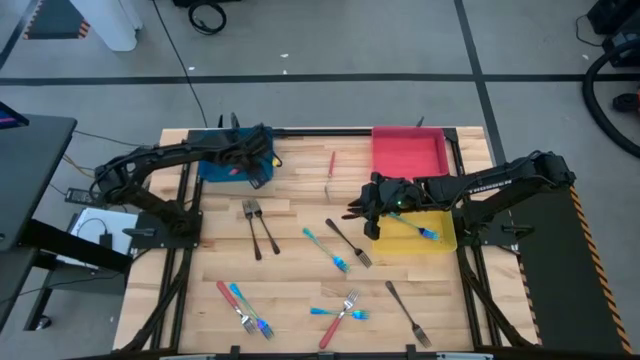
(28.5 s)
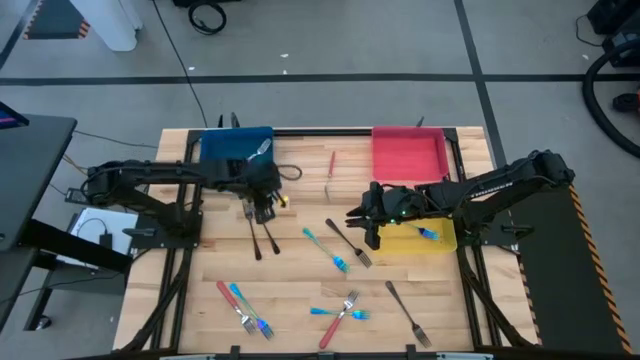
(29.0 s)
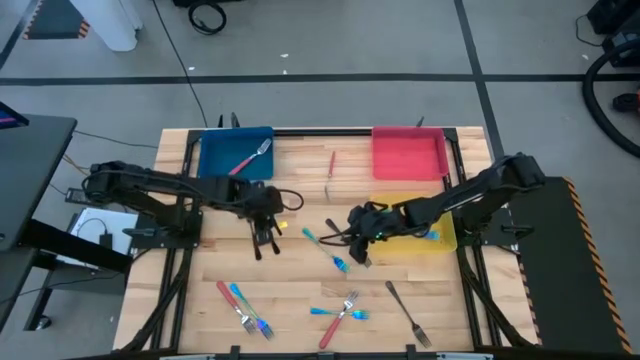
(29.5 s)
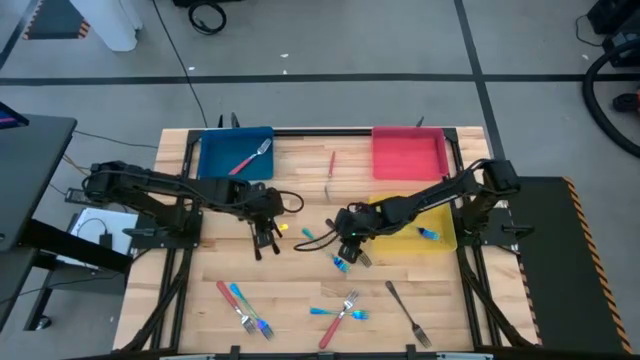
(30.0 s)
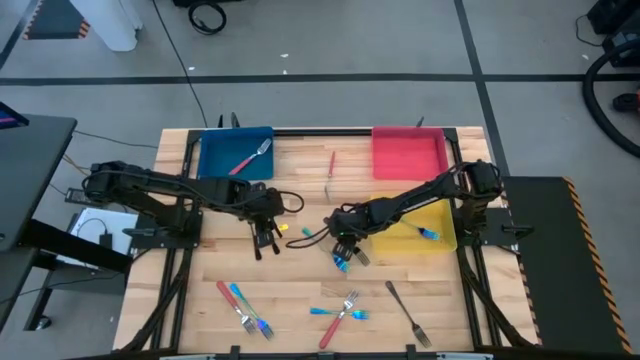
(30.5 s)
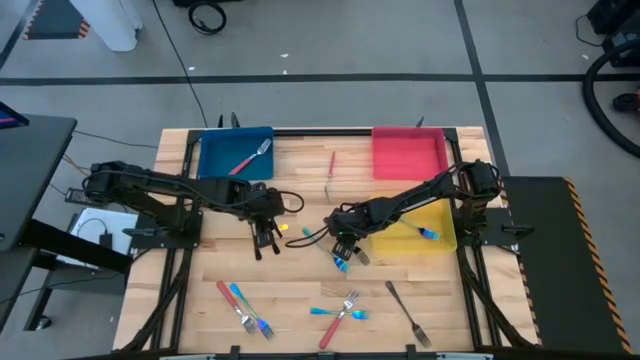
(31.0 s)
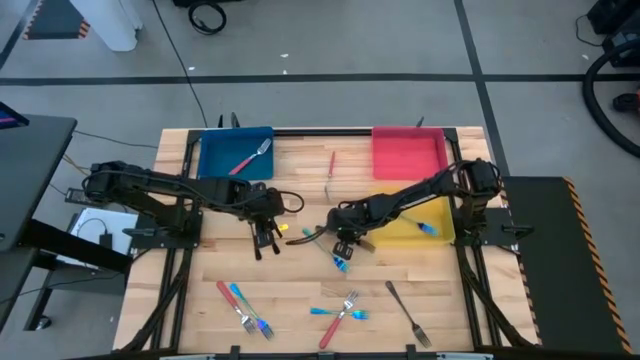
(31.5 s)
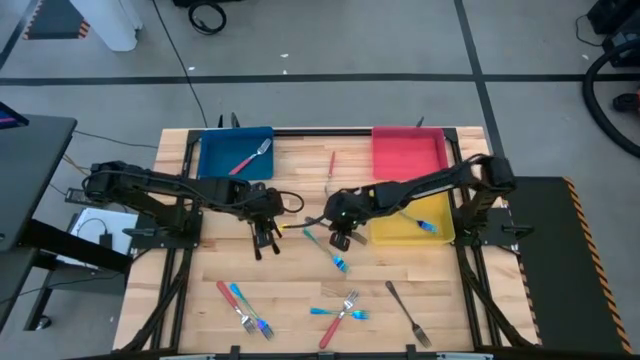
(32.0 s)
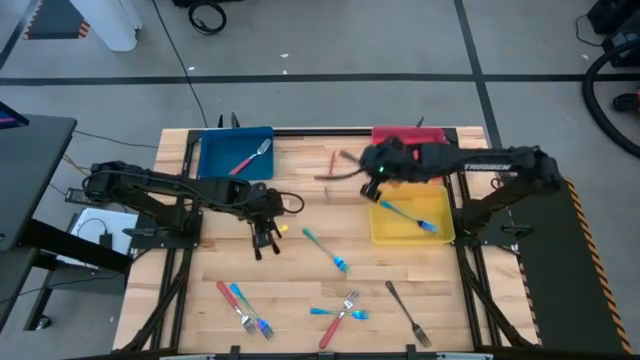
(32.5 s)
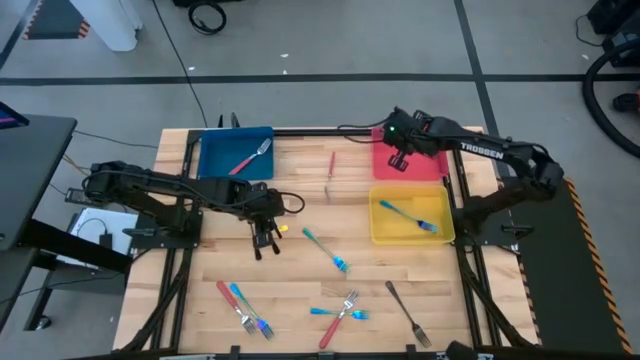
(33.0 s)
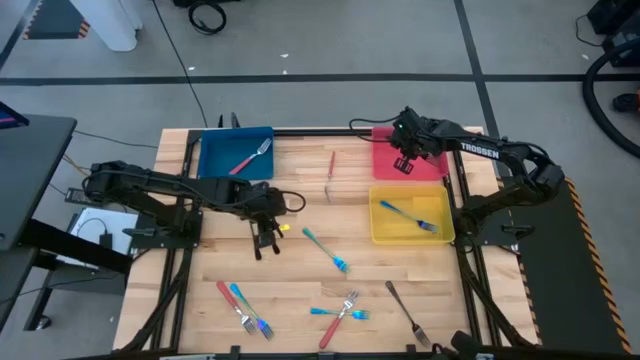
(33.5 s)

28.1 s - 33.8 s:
Task: Sort silverware by color (type)
Put the center black fork into the red bin

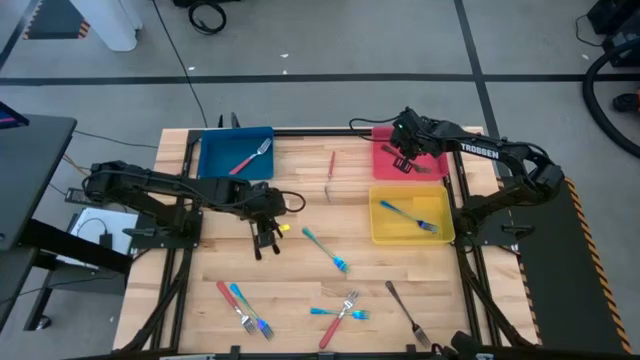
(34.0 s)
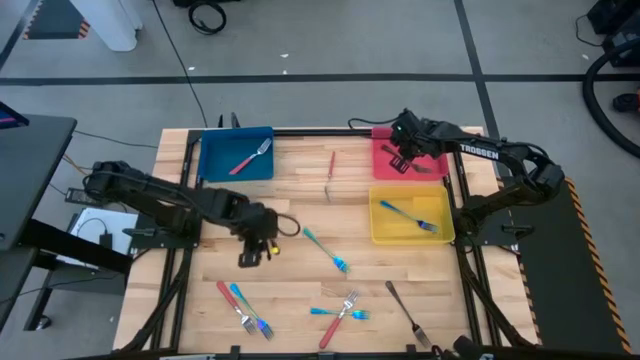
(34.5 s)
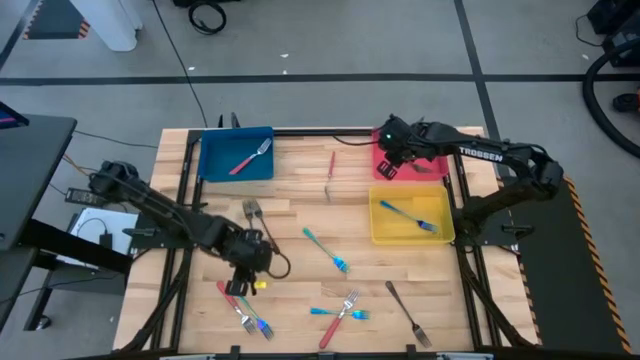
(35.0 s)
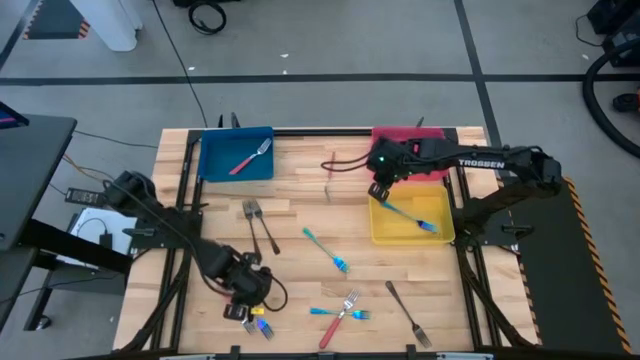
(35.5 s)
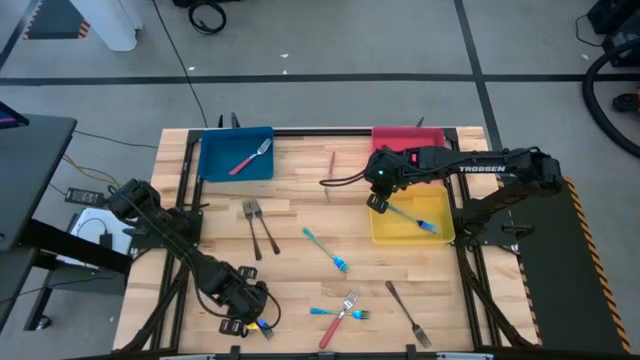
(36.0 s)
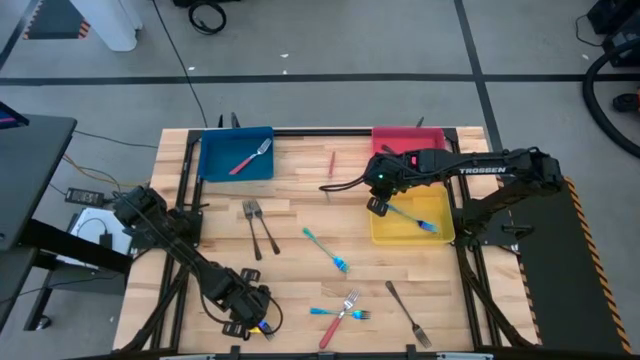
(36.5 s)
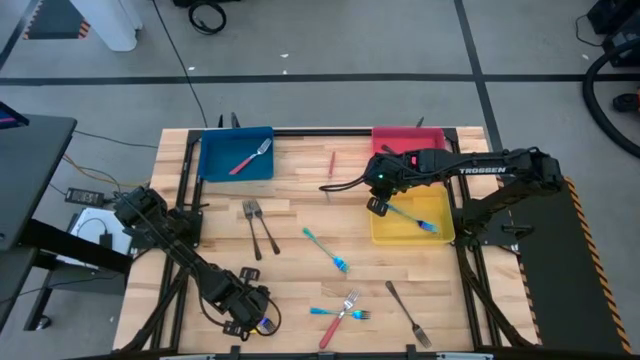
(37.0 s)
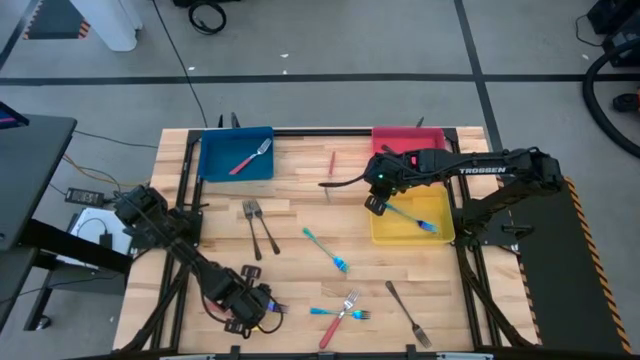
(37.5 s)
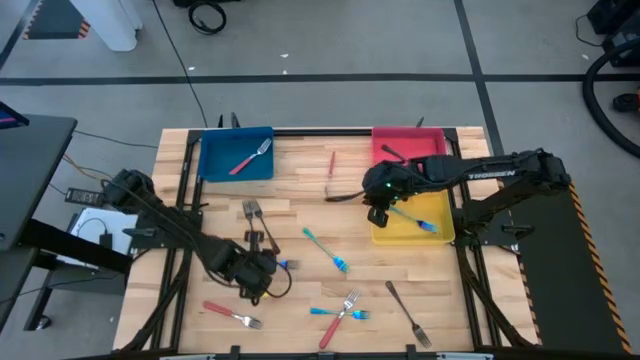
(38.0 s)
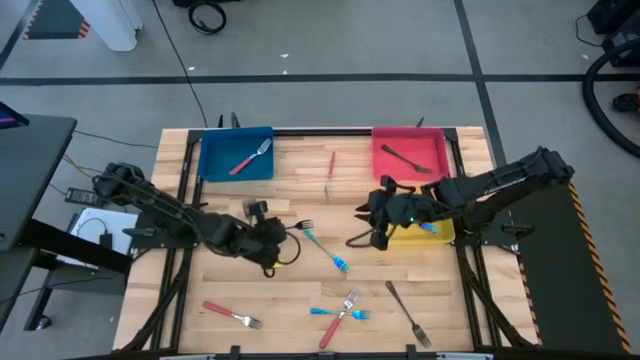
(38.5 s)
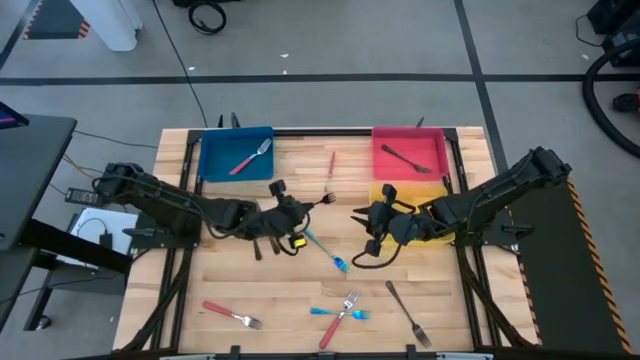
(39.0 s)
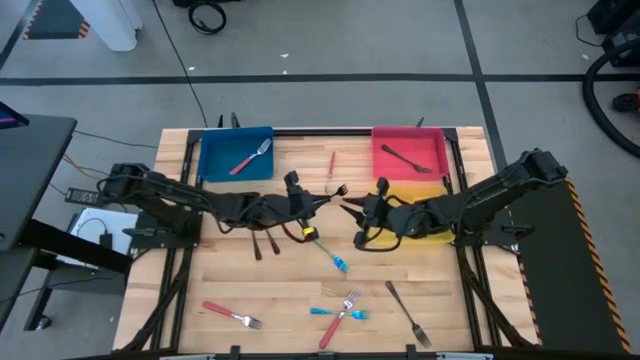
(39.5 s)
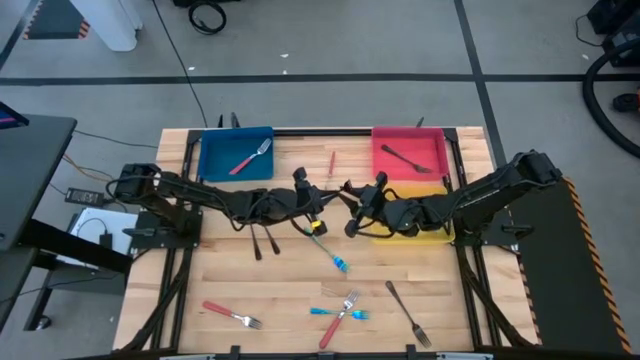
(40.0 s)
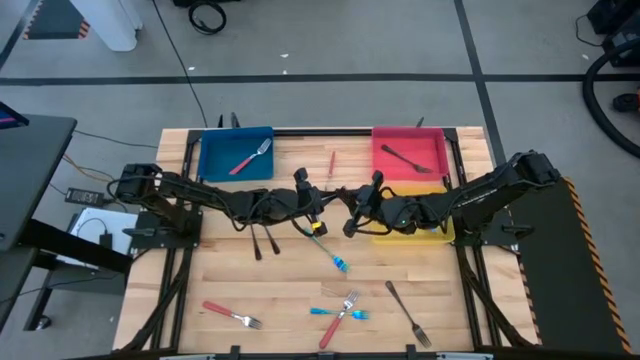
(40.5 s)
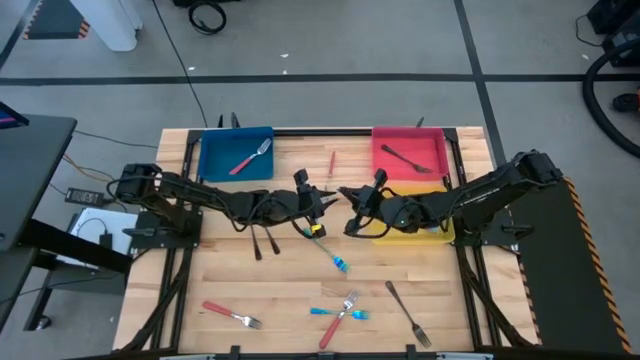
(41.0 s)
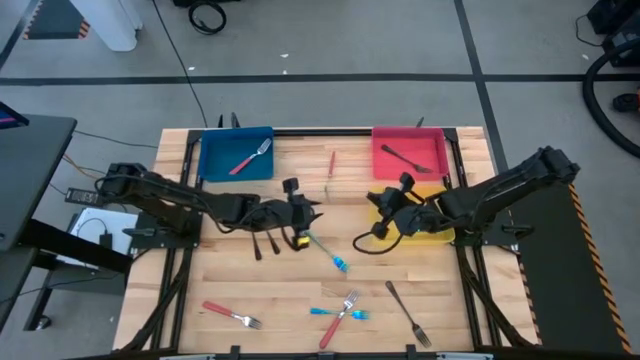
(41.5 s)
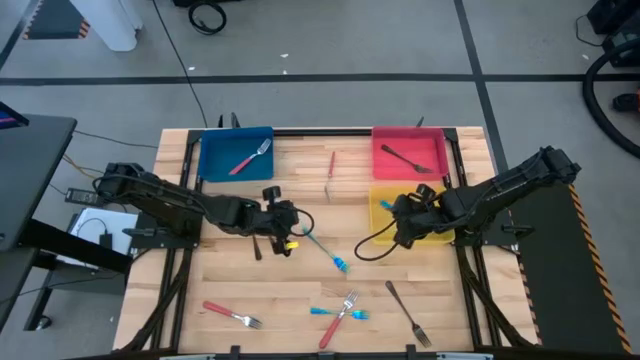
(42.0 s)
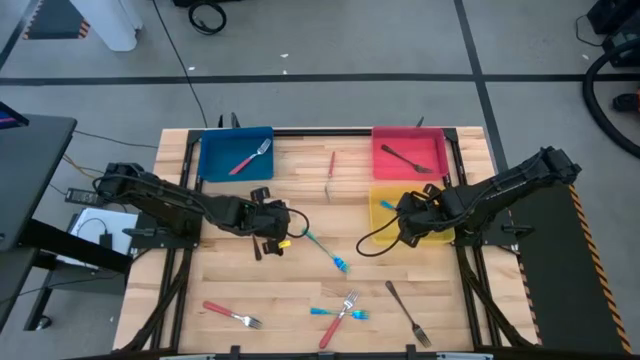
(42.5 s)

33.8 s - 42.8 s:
Put the bottom left blue fork into the yellow bin

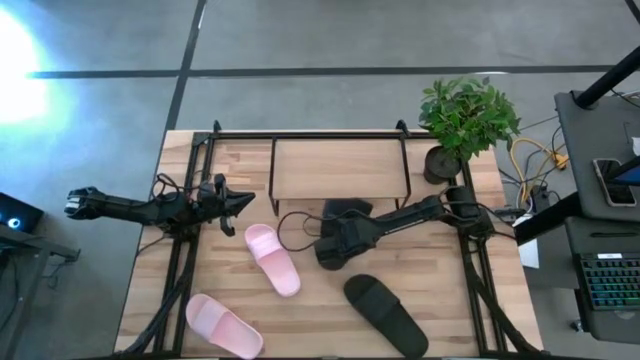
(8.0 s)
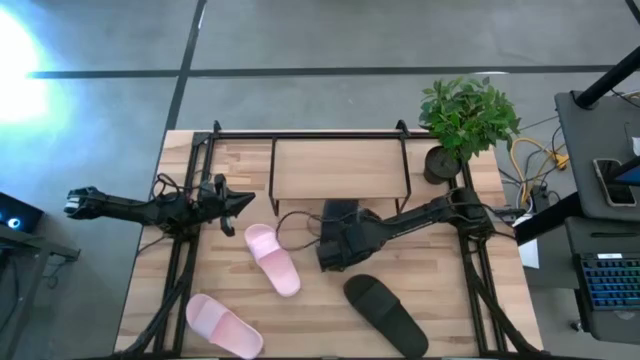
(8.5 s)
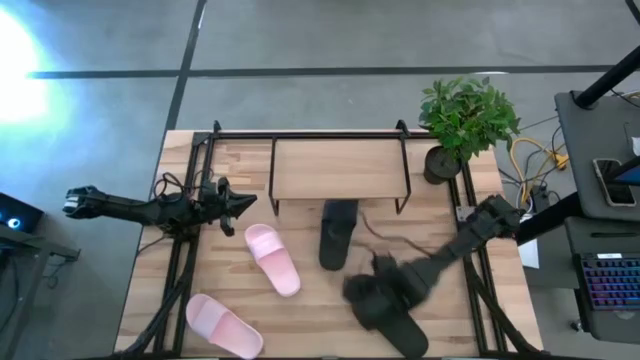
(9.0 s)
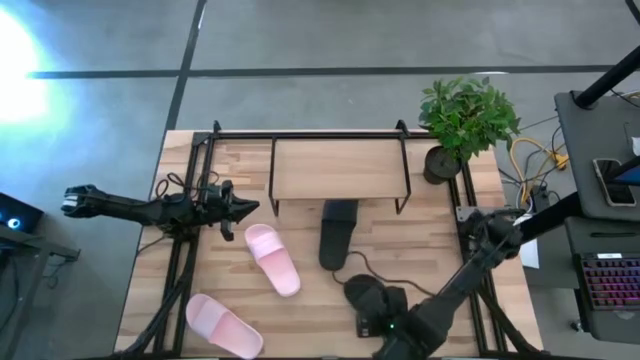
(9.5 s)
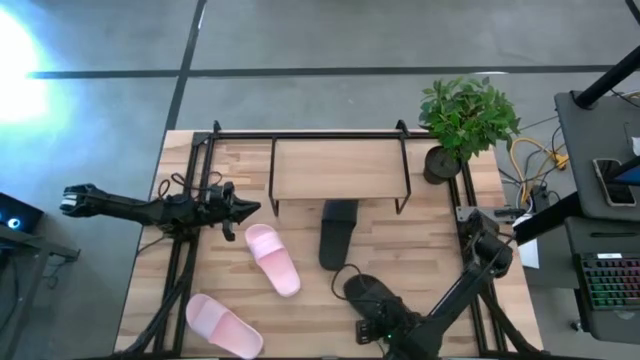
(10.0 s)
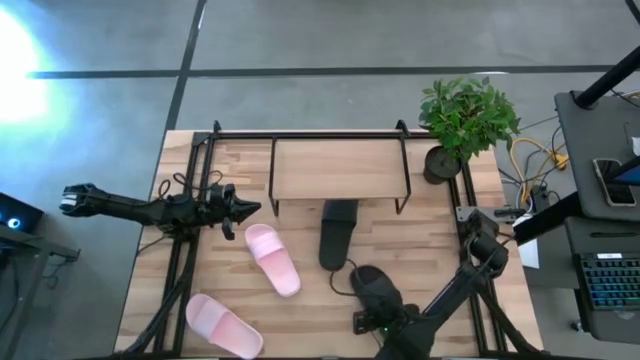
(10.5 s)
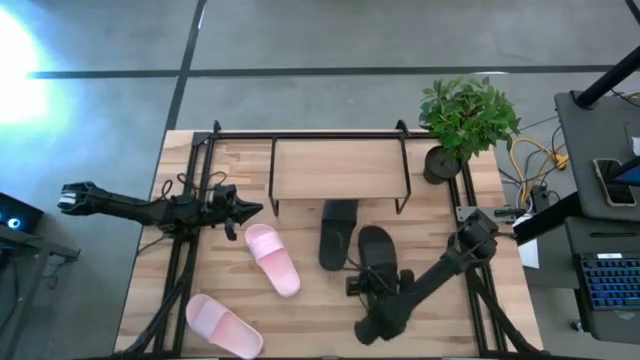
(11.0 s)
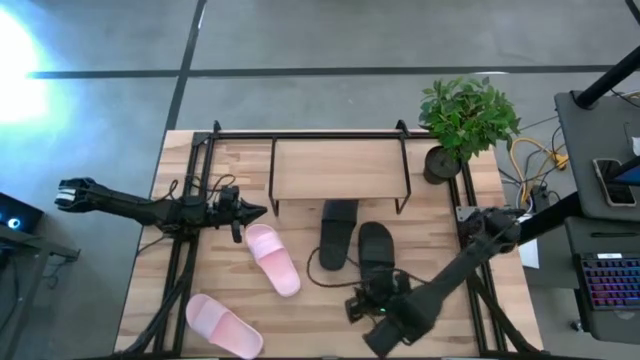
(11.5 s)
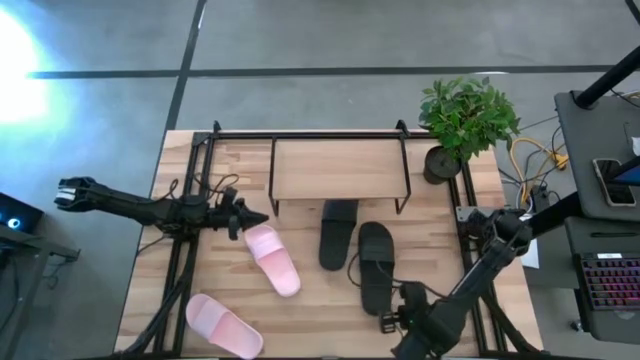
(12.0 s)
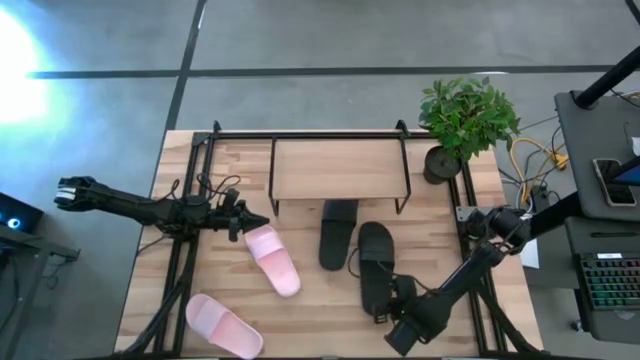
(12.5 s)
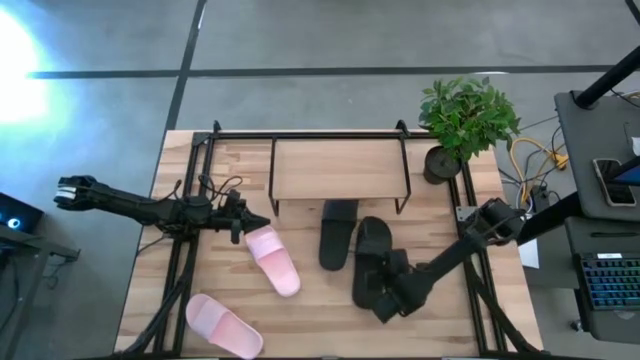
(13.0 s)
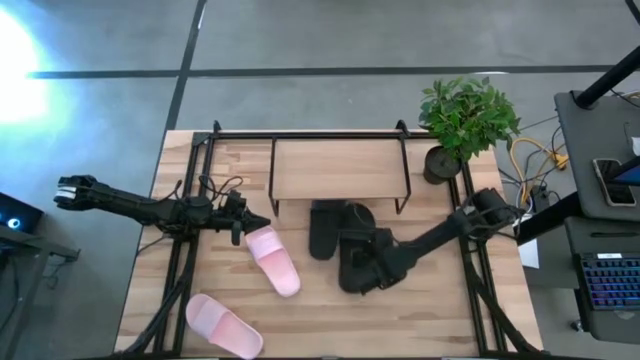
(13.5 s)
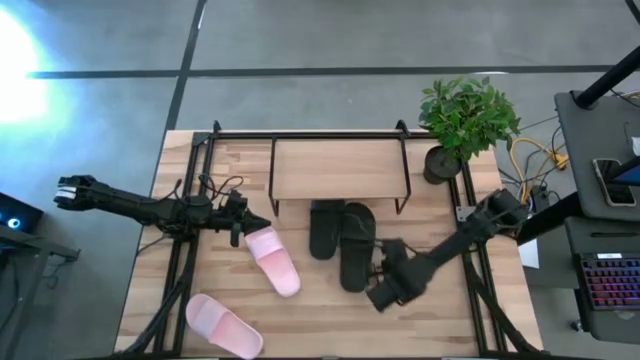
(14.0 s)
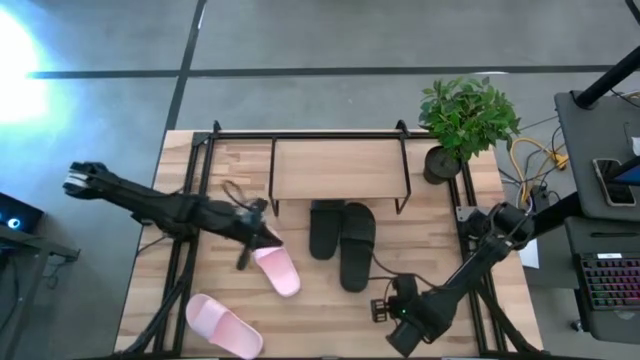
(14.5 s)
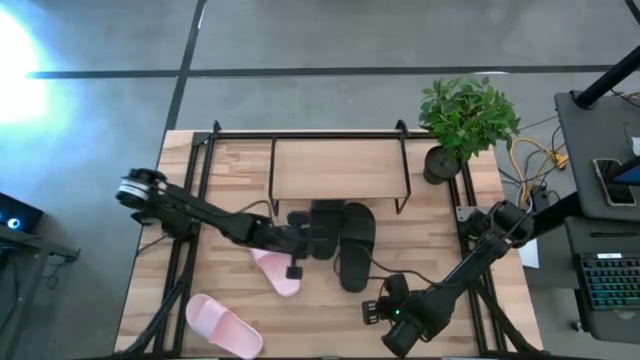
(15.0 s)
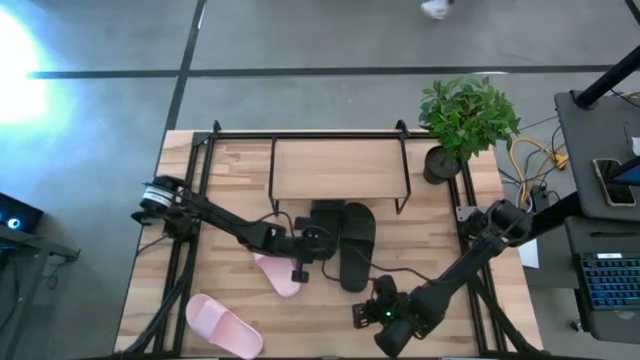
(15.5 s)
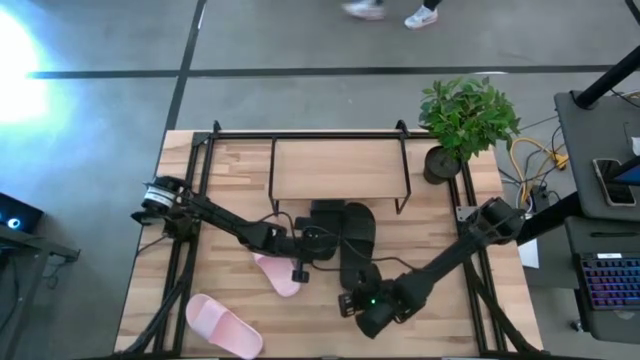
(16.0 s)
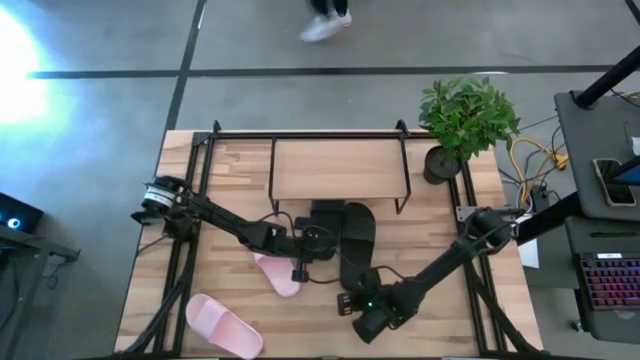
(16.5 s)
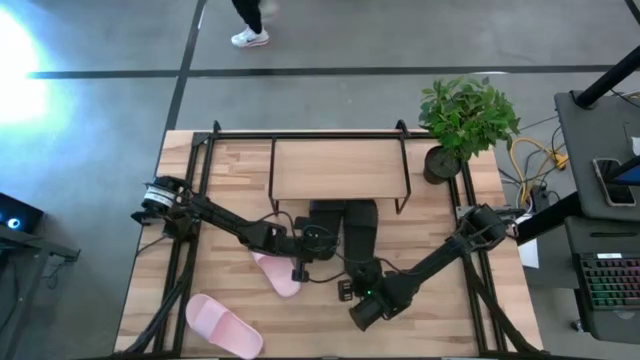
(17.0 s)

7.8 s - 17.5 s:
Task: Pick and place slides into the shelf
Put the black slide under the shelf
